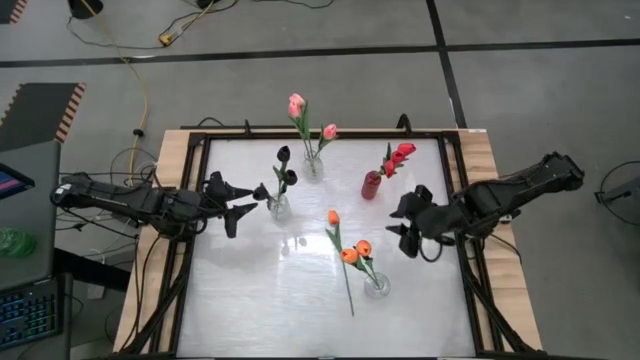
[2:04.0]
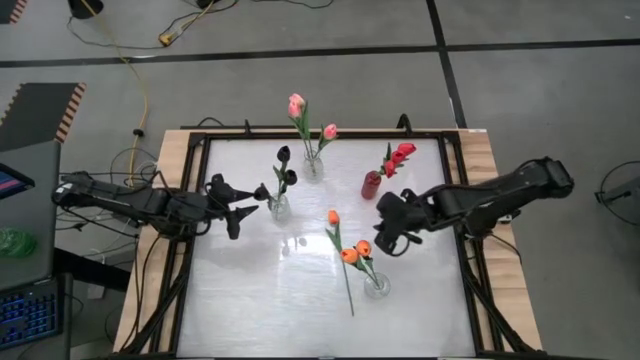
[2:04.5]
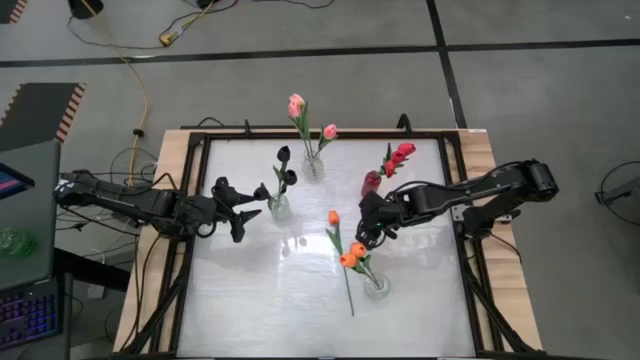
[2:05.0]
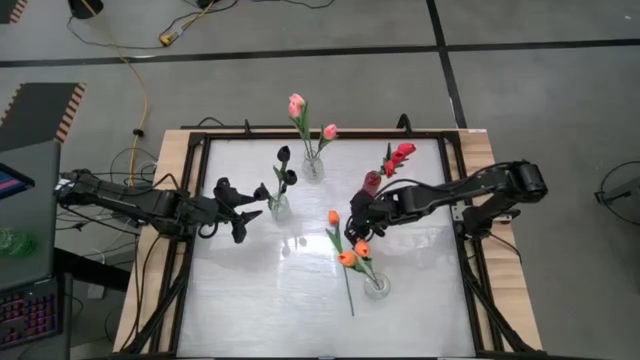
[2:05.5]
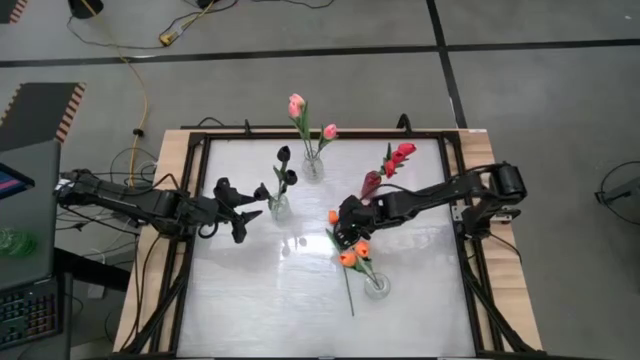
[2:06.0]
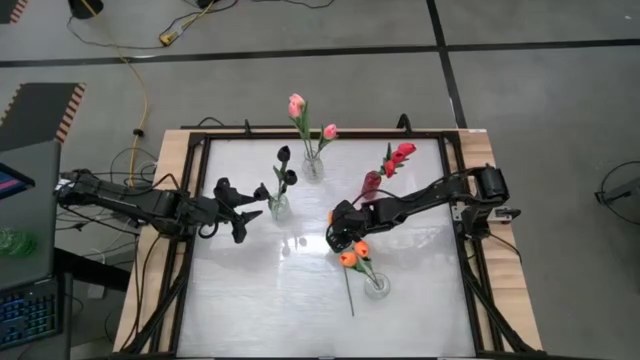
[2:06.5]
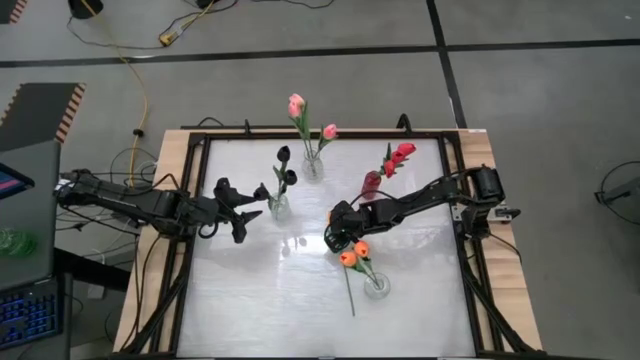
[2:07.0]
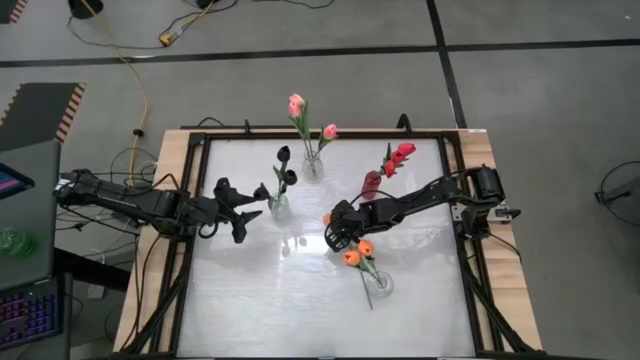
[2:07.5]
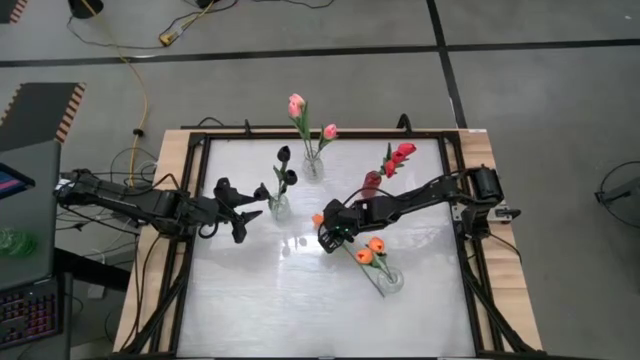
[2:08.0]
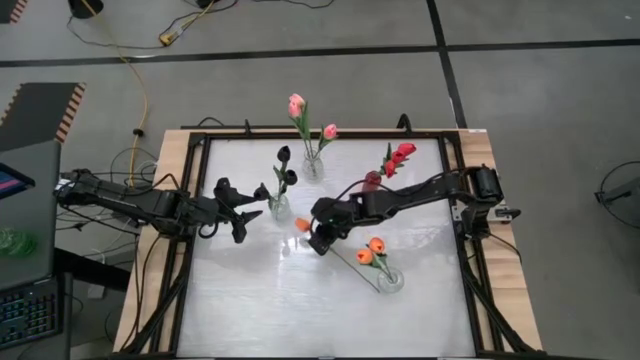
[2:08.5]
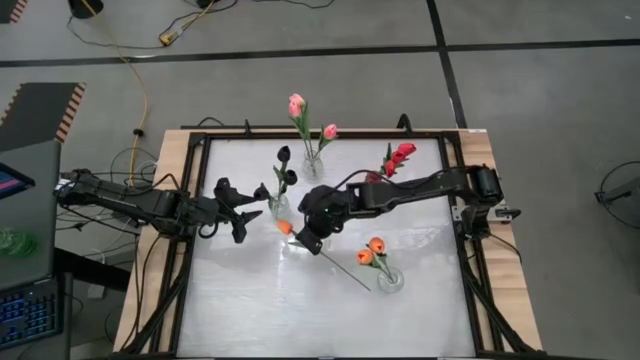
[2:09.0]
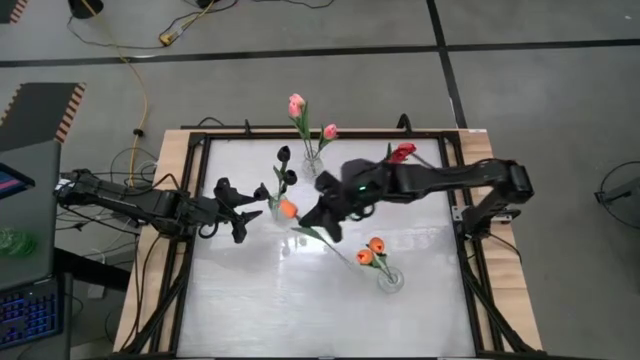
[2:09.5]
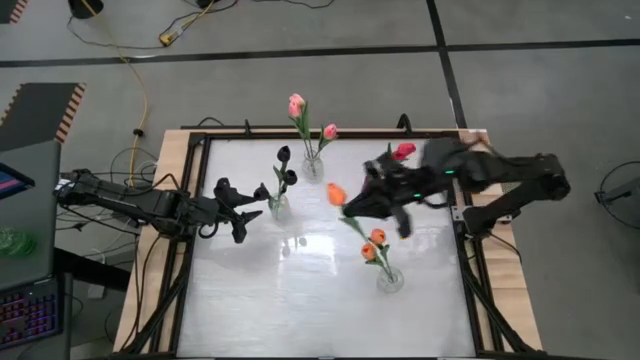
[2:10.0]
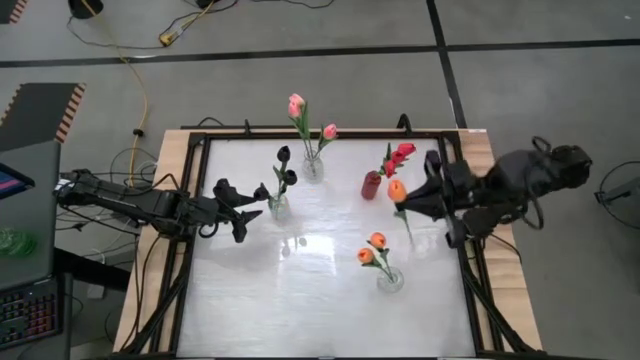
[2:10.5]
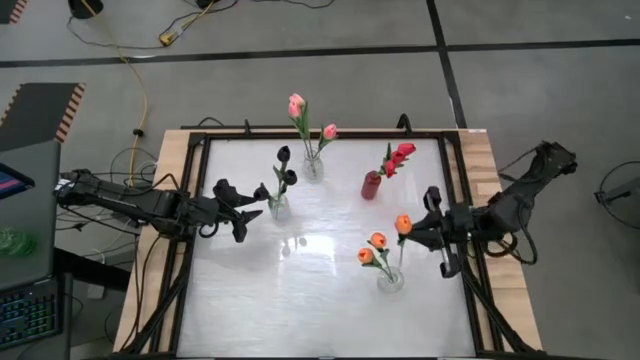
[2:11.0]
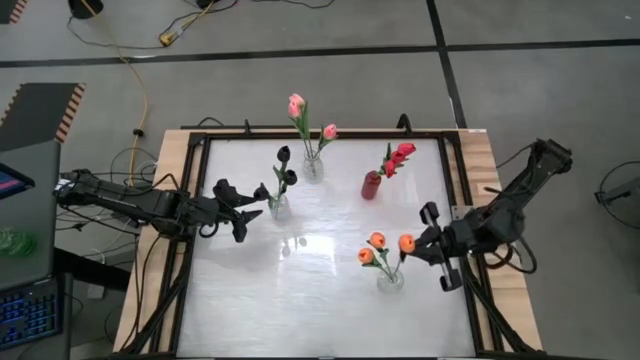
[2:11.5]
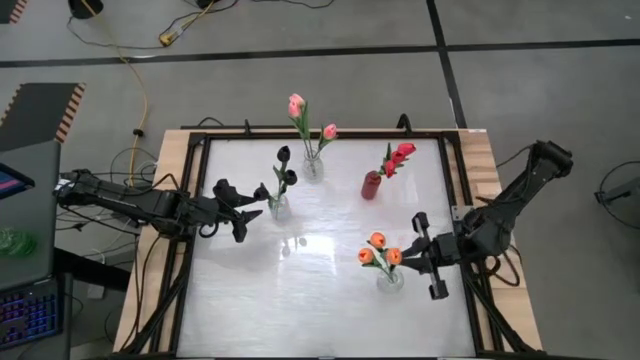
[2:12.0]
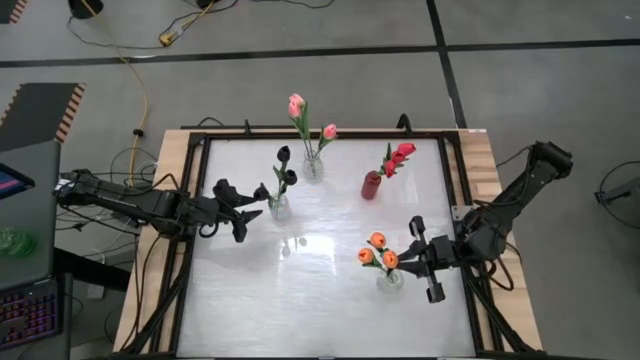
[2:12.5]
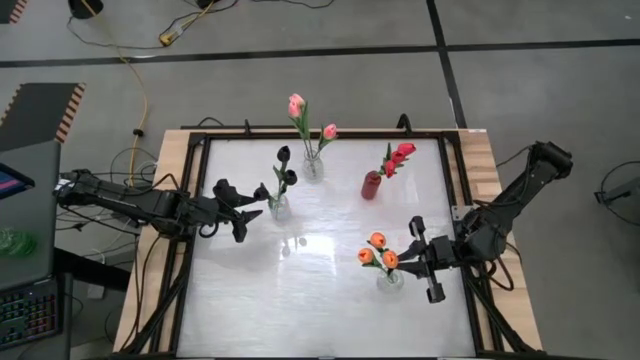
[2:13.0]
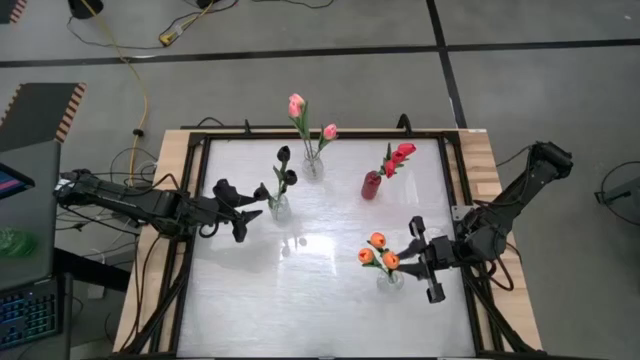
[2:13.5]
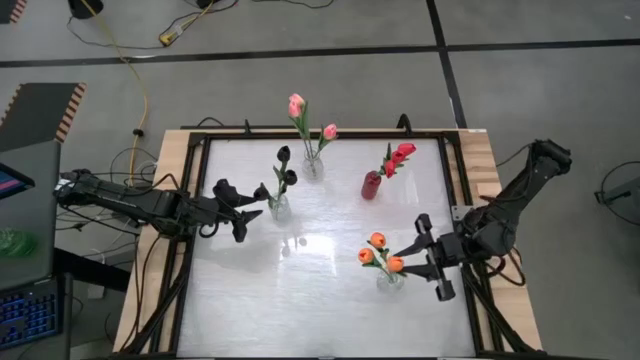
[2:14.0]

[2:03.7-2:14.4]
Task: Sort flowers into vase by color
Put the orange tulip into the bottom transparent vase

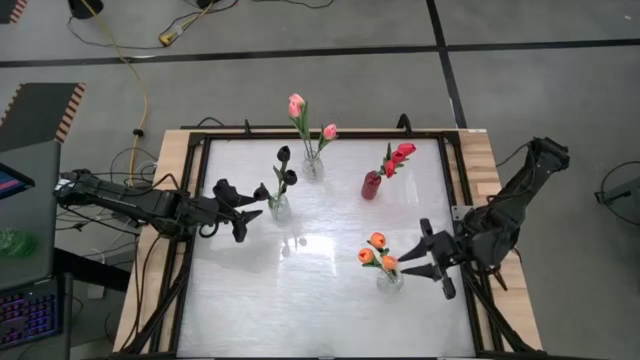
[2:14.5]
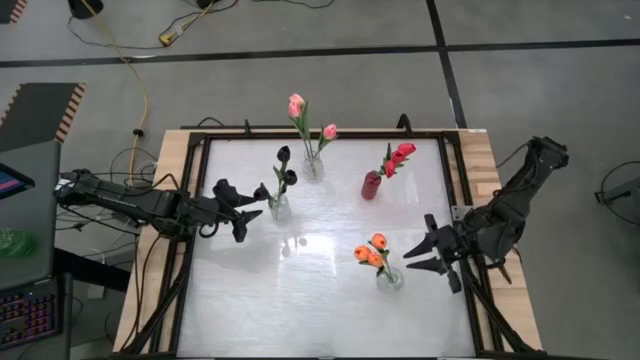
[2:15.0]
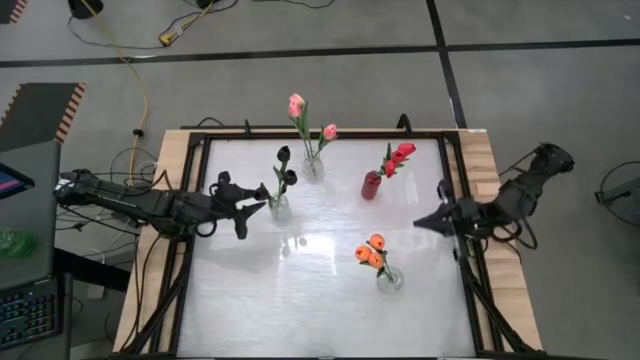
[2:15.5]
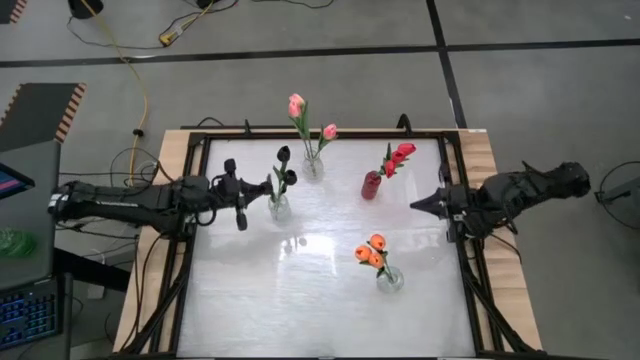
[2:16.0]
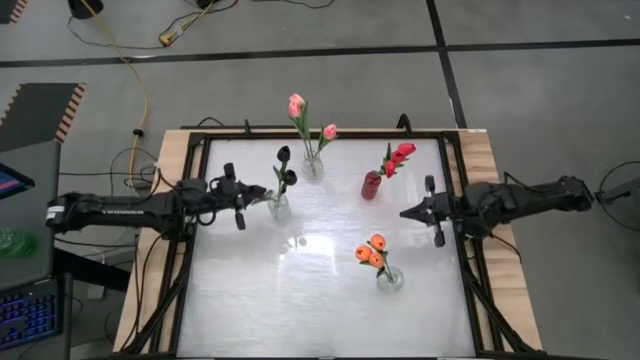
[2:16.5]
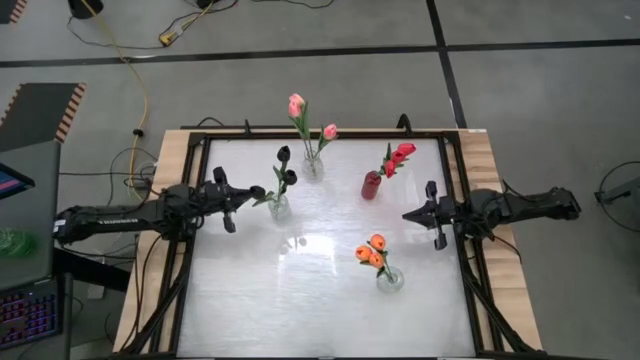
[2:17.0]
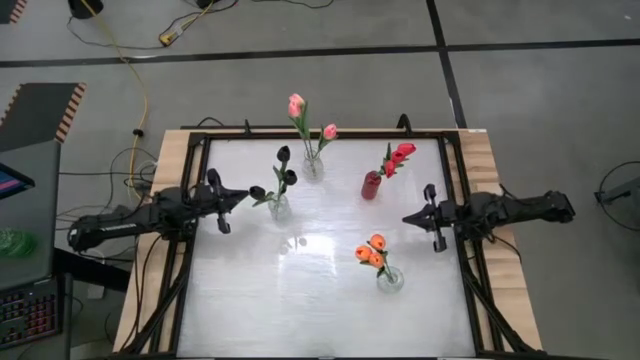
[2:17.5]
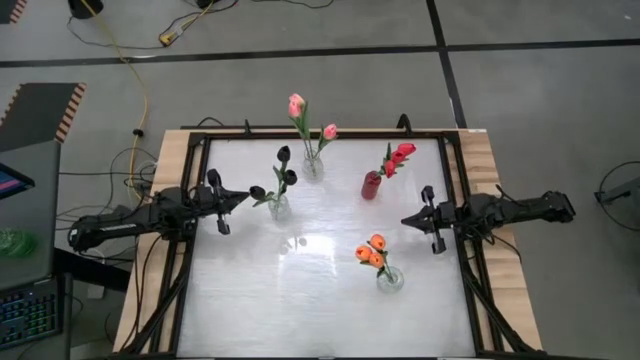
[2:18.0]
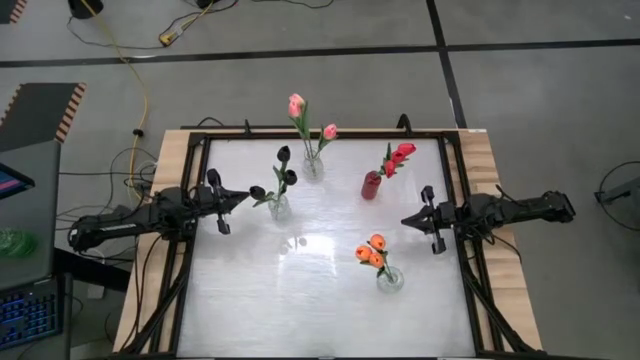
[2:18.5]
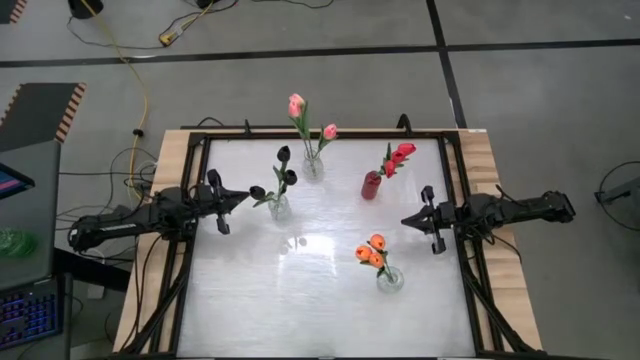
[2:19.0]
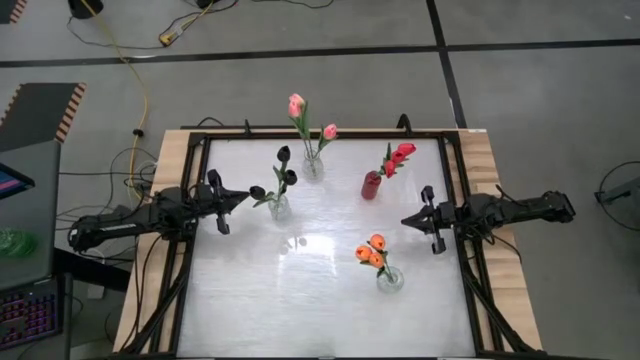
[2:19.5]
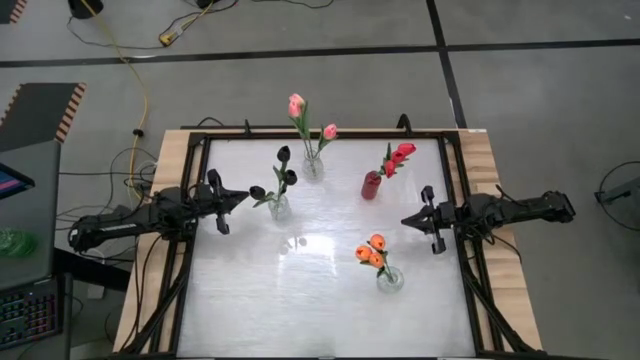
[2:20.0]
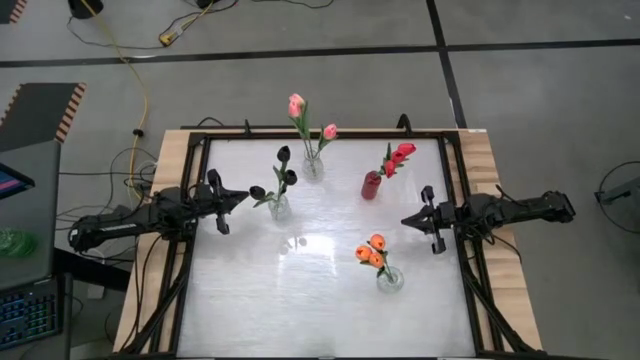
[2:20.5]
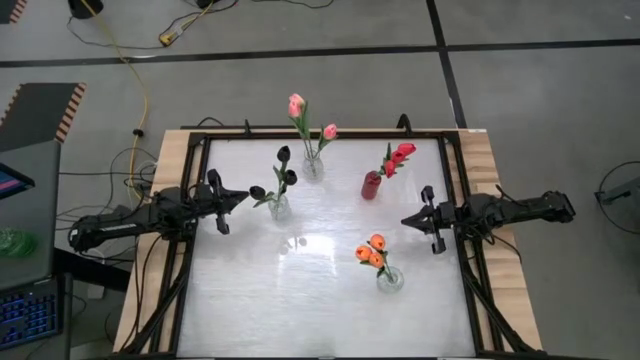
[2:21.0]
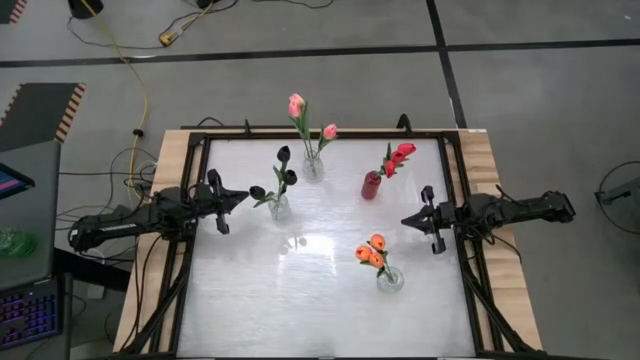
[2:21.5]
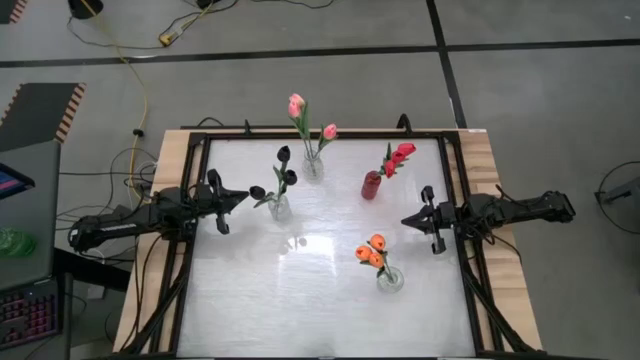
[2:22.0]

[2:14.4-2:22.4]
Return to Home Position

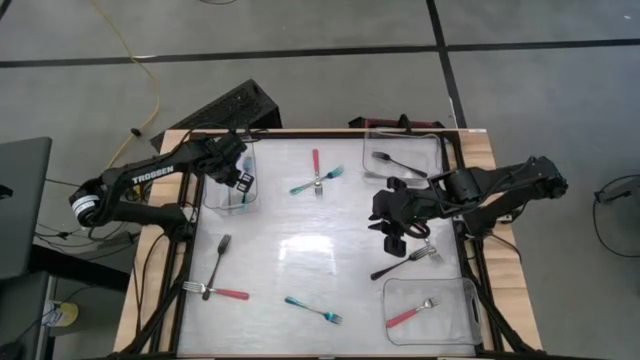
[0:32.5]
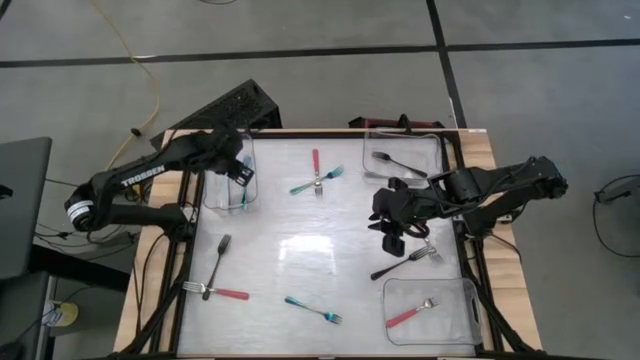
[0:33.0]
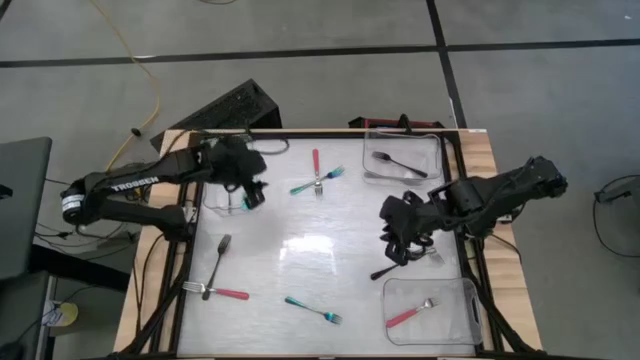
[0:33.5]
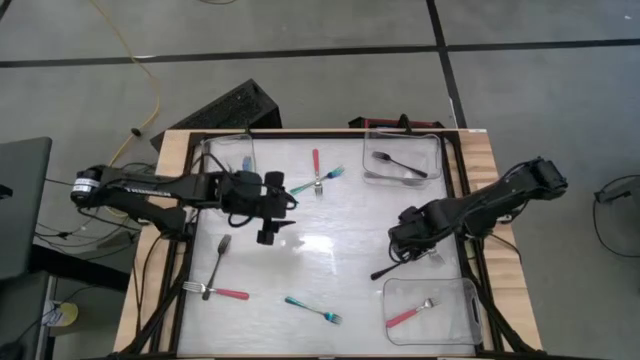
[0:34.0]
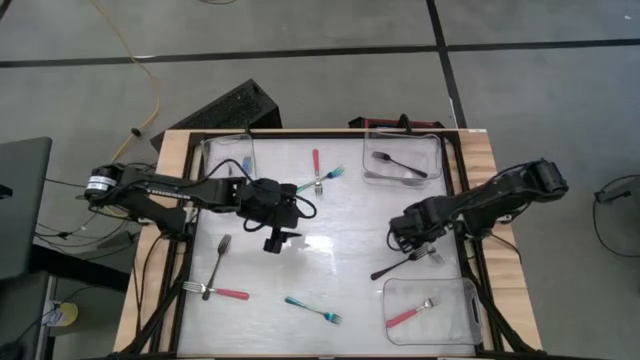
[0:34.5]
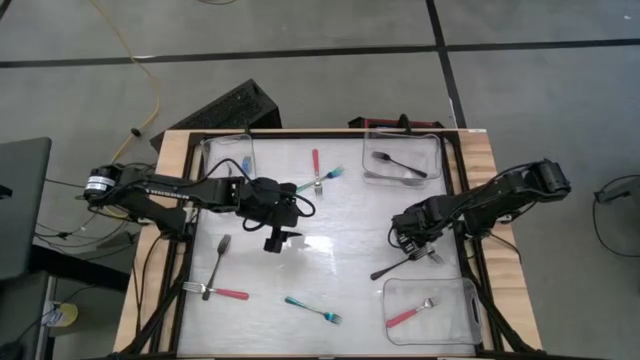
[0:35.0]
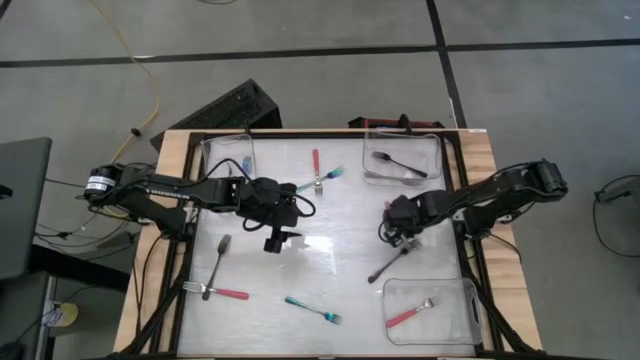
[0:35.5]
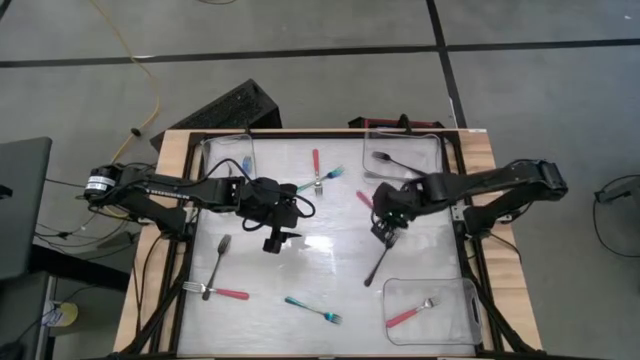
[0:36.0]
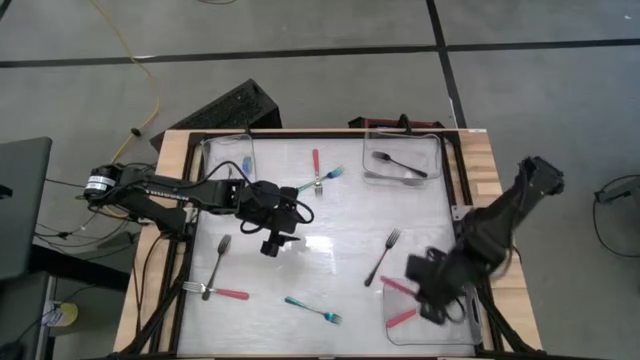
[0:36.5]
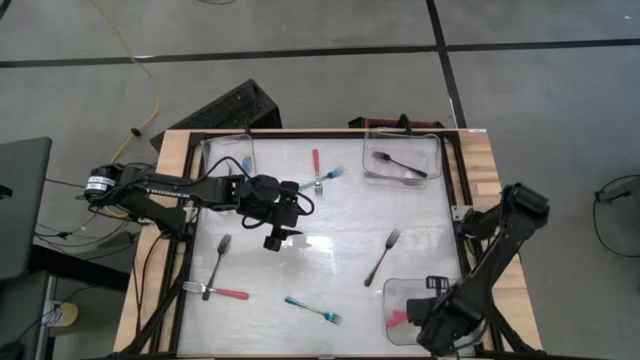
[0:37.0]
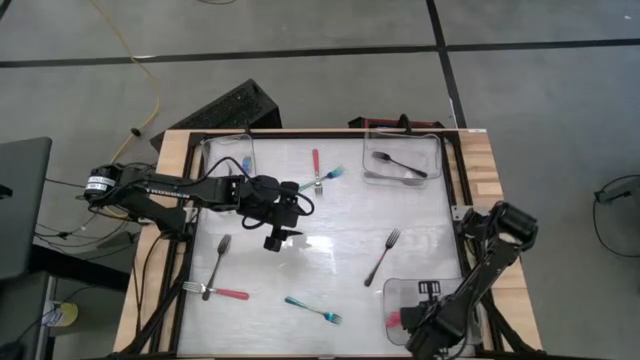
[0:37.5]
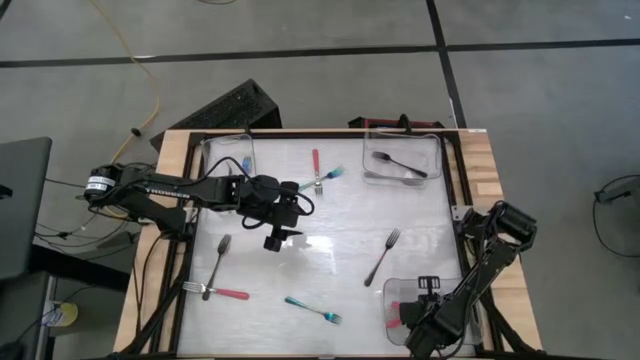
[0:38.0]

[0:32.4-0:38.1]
Task: Sort silverware by color (type)
Put the pink fork into the bottom right transparent bin
